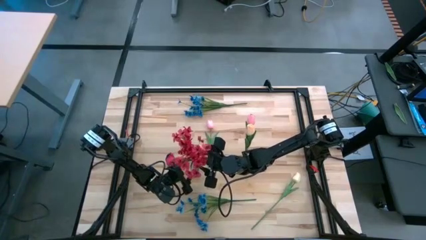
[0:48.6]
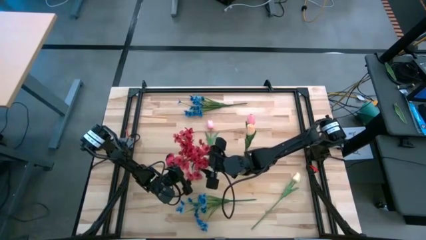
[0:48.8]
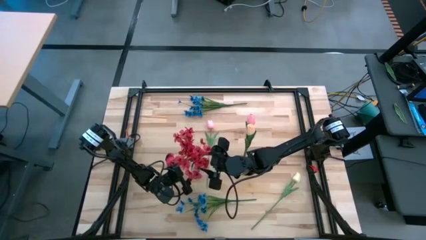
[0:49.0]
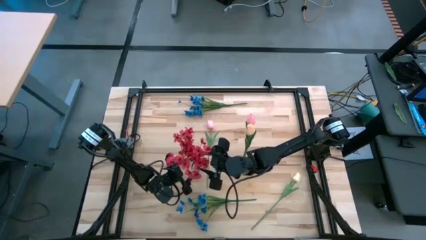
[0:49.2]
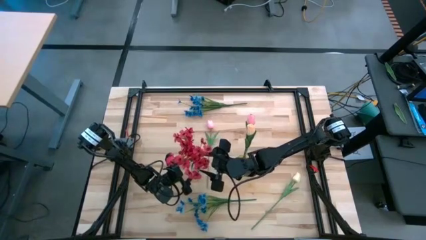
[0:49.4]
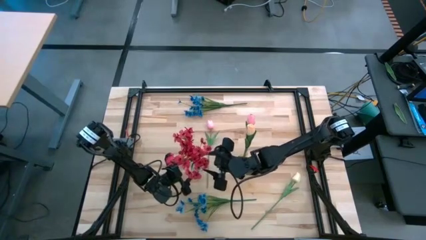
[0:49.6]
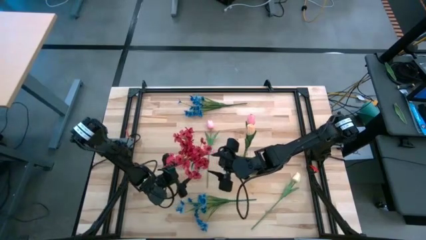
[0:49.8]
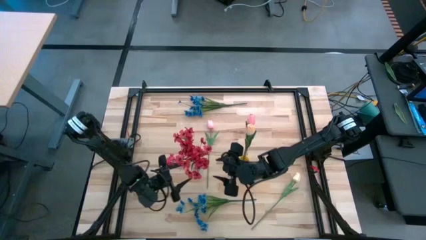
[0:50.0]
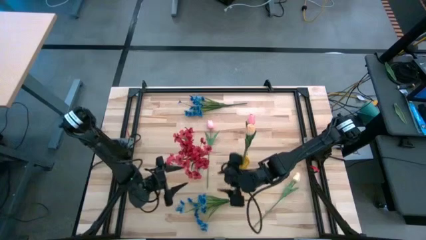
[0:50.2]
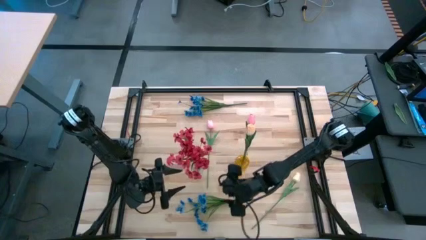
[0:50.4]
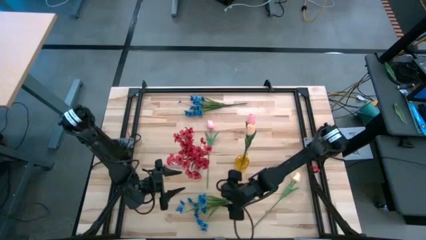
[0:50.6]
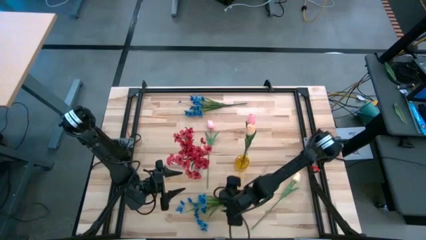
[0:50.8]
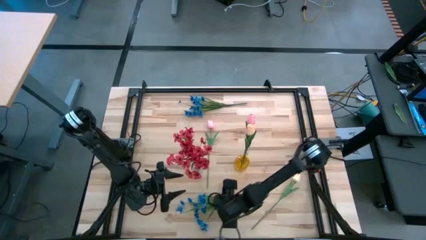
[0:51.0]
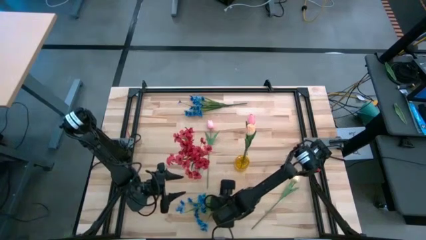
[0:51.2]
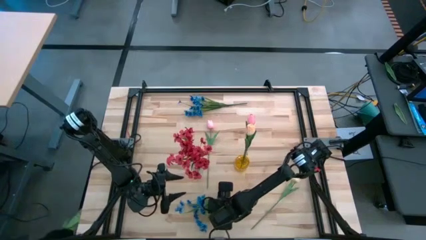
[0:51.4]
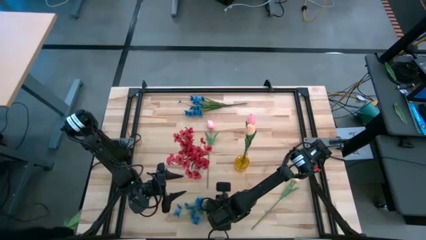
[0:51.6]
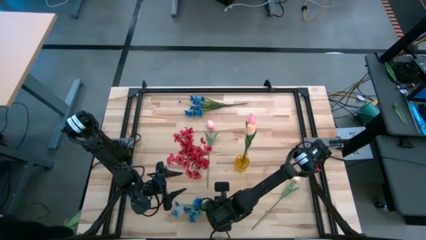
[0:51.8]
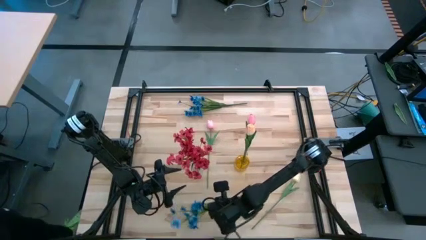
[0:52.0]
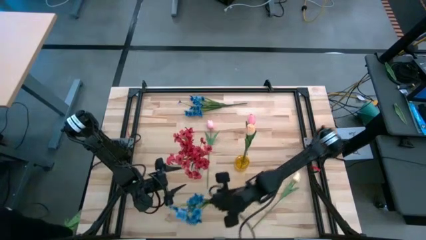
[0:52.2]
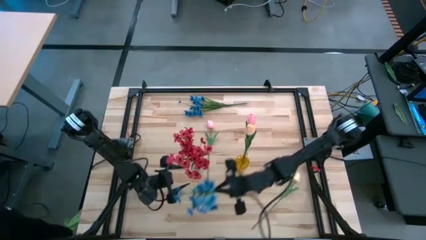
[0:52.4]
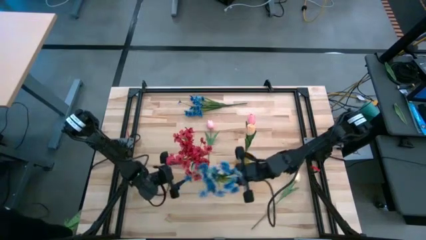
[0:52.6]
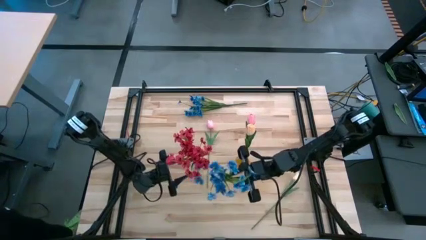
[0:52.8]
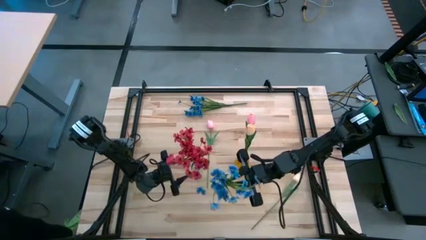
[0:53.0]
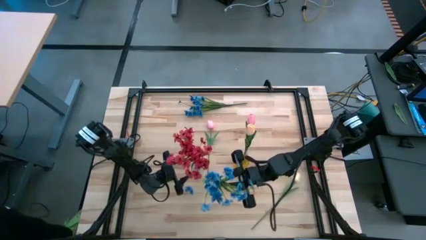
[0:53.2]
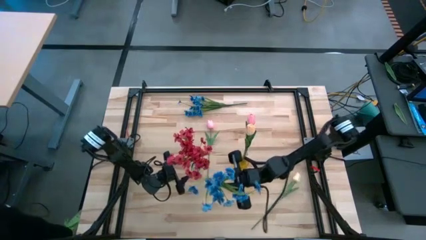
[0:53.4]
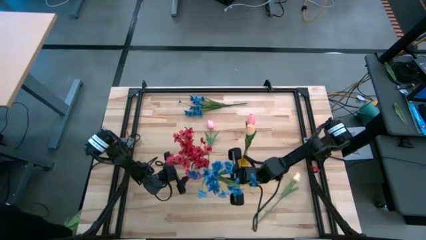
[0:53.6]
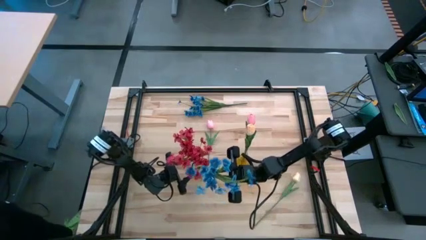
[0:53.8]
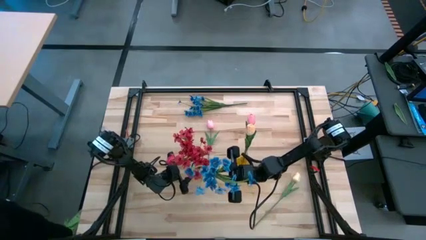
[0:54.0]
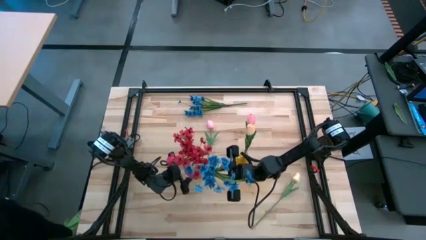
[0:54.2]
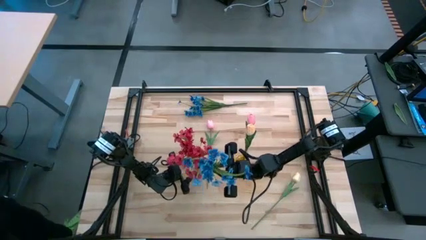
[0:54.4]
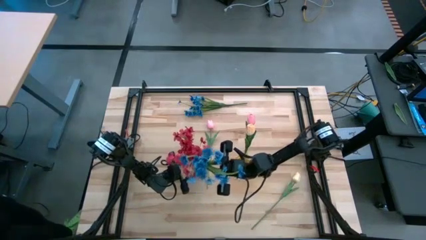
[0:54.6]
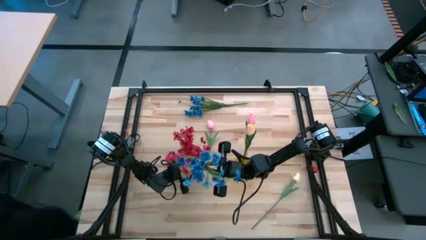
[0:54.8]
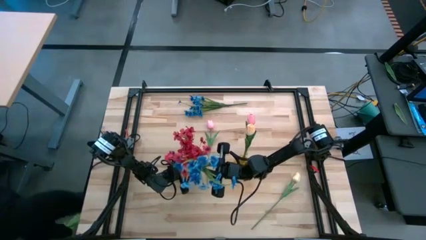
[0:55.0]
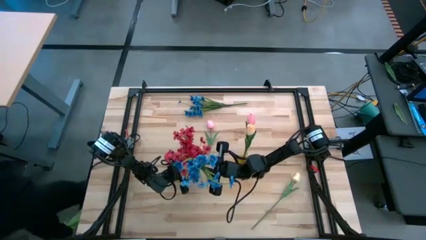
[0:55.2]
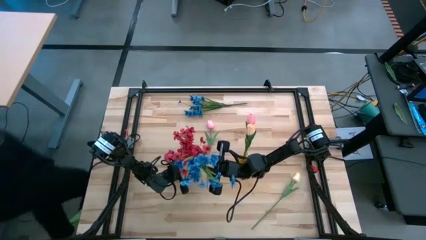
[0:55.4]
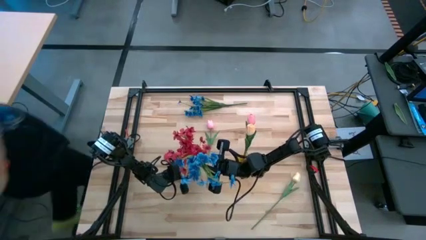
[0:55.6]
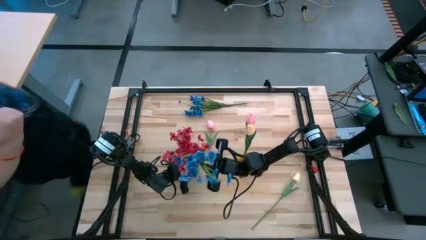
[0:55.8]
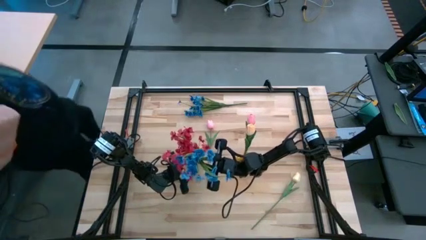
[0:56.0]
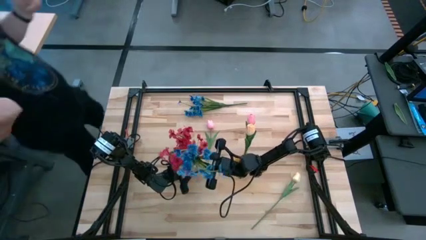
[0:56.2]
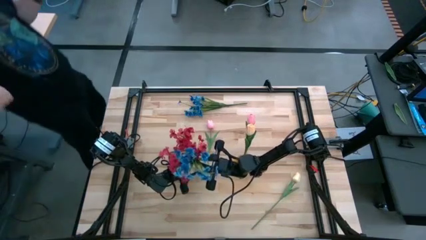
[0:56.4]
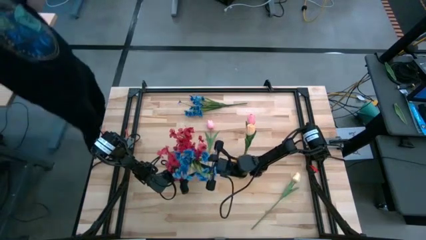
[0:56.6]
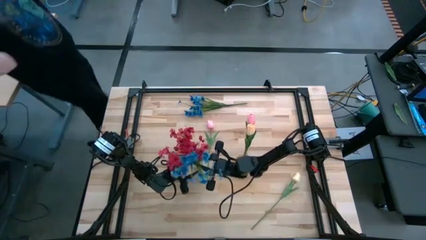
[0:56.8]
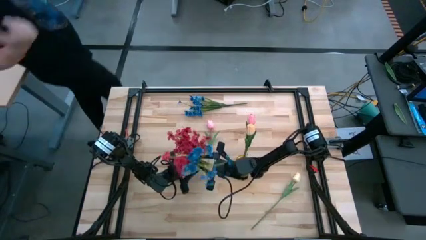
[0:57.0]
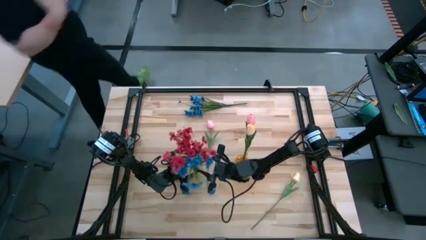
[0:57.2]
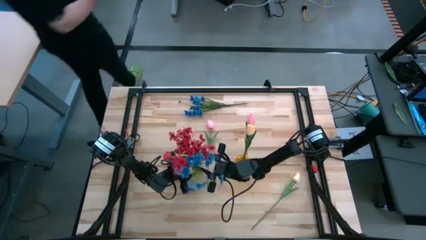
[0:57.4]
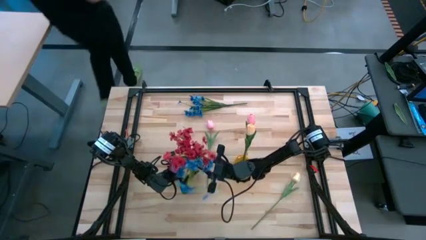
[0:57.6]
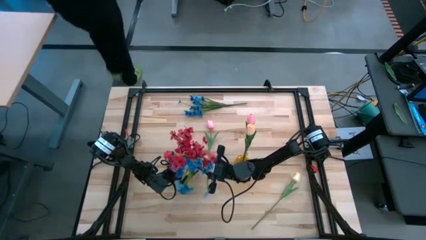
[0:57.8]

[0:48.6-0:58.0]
Task: Sort flowers into vase by color
Put the bottom blue flower into the transparent vase

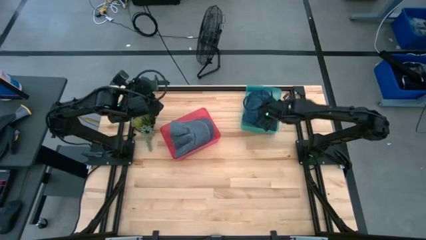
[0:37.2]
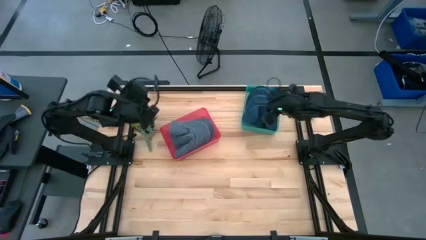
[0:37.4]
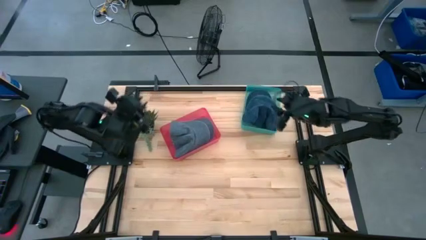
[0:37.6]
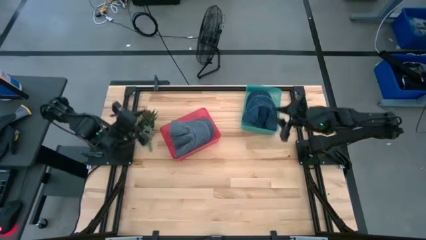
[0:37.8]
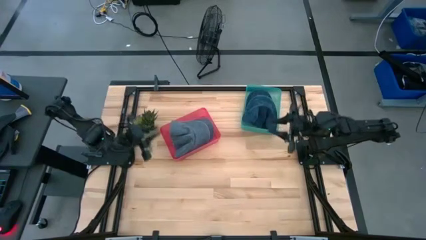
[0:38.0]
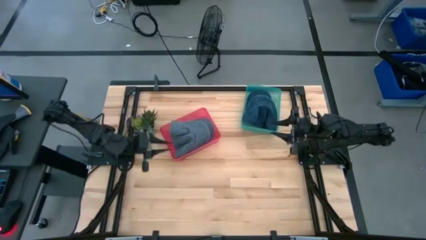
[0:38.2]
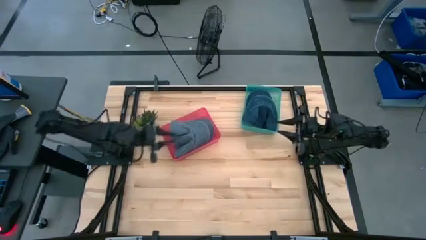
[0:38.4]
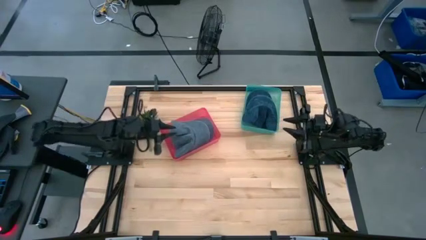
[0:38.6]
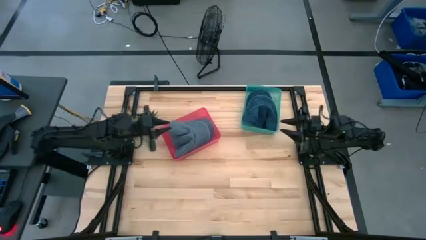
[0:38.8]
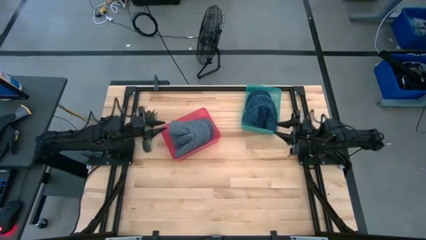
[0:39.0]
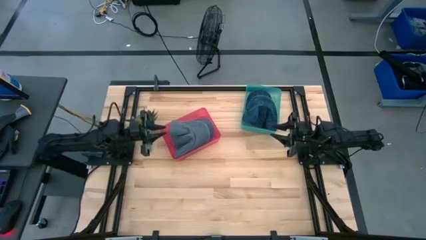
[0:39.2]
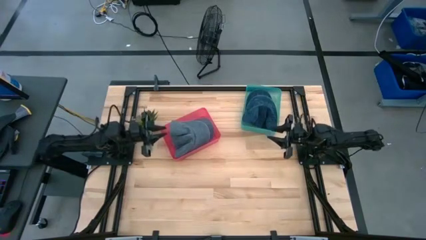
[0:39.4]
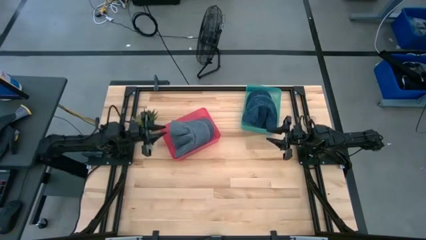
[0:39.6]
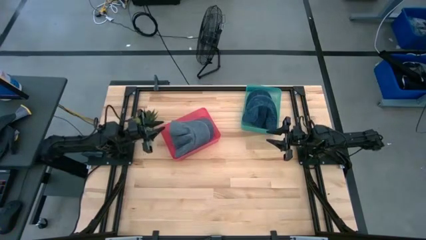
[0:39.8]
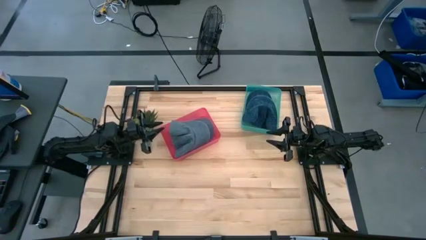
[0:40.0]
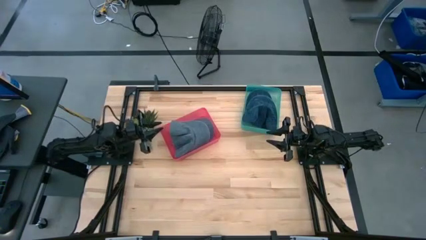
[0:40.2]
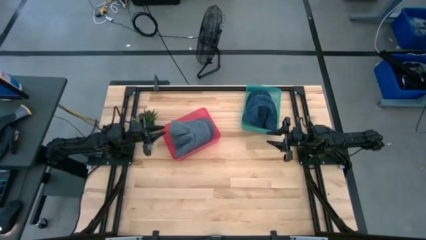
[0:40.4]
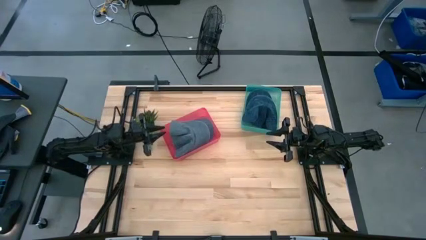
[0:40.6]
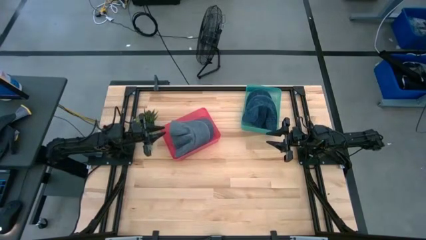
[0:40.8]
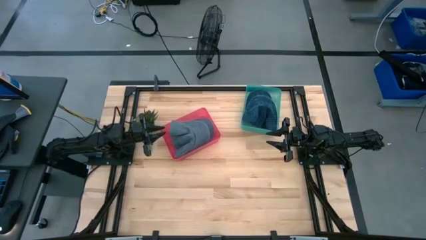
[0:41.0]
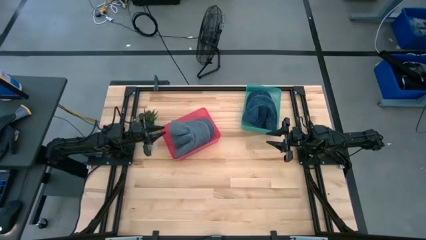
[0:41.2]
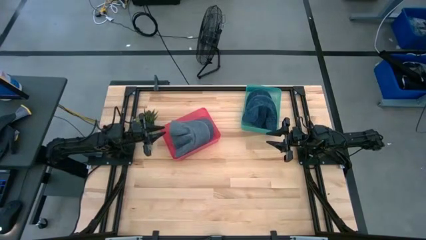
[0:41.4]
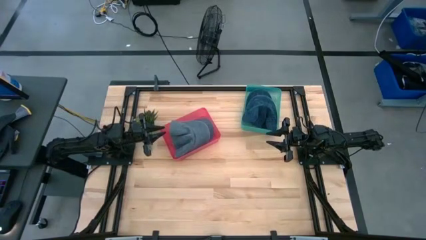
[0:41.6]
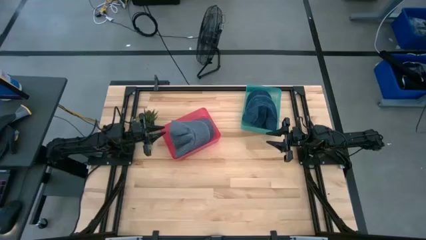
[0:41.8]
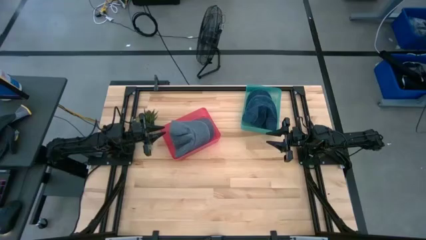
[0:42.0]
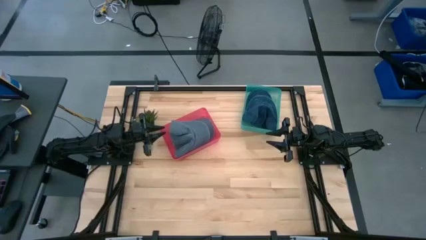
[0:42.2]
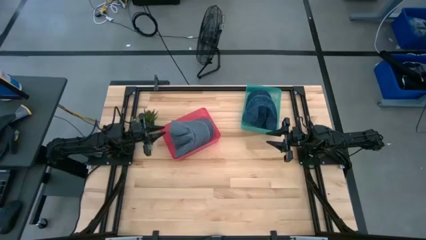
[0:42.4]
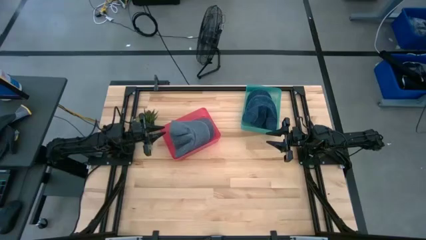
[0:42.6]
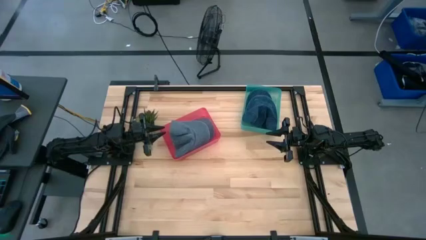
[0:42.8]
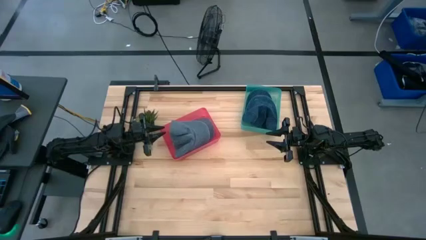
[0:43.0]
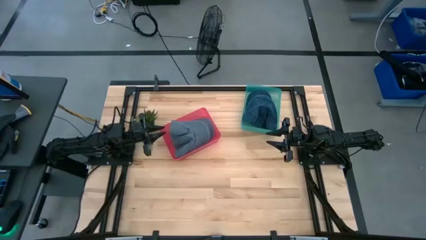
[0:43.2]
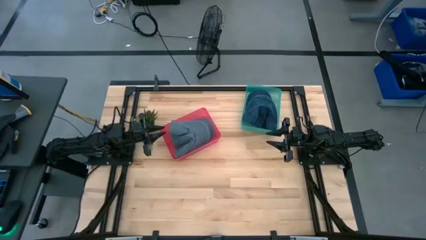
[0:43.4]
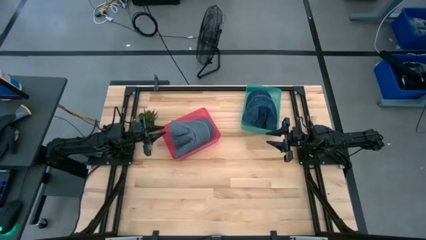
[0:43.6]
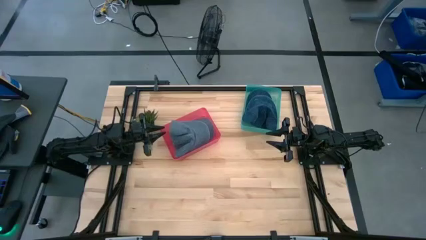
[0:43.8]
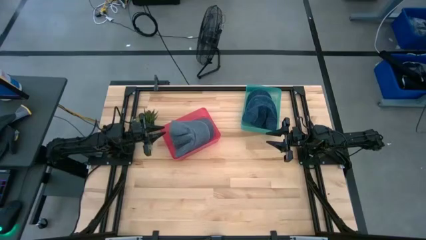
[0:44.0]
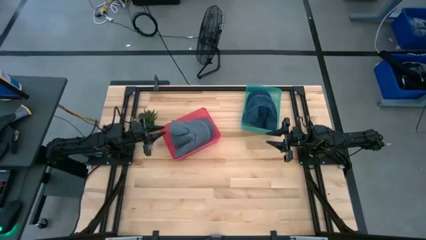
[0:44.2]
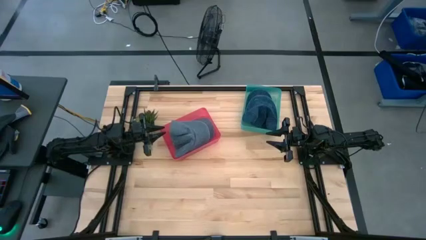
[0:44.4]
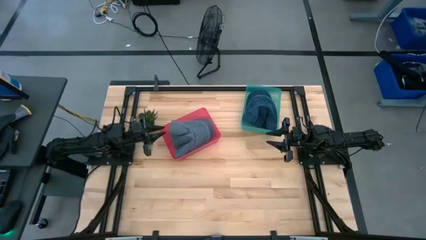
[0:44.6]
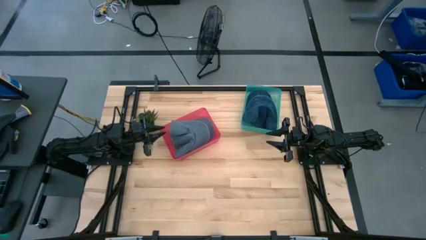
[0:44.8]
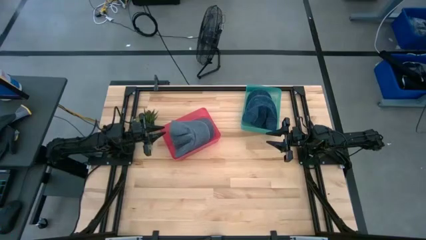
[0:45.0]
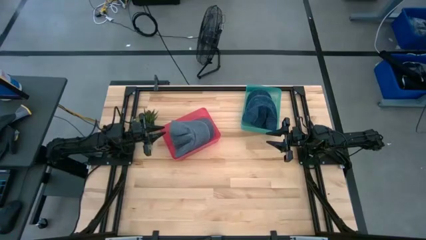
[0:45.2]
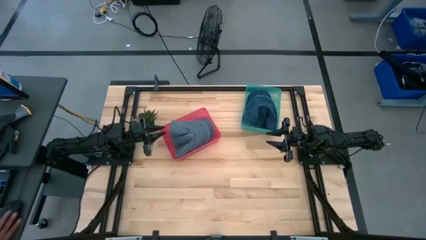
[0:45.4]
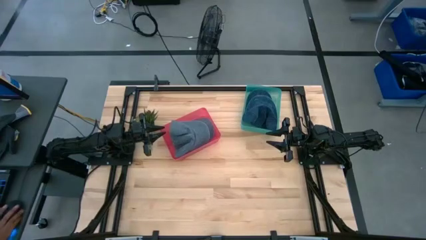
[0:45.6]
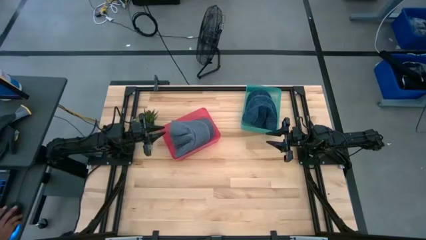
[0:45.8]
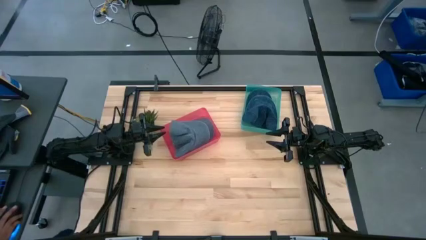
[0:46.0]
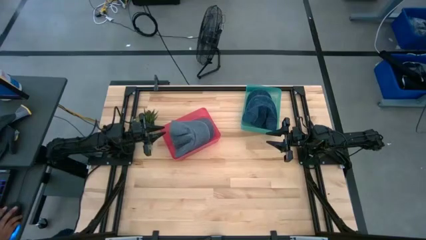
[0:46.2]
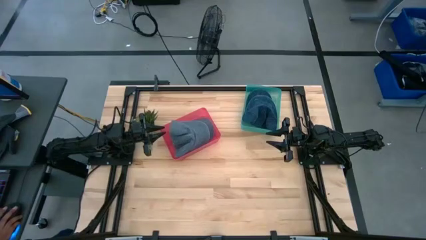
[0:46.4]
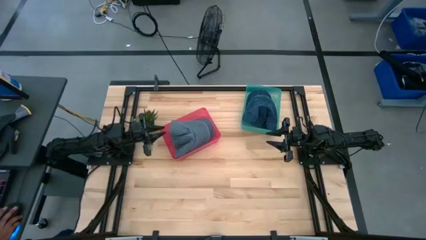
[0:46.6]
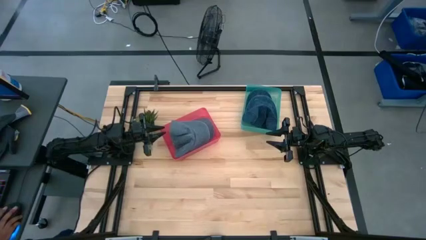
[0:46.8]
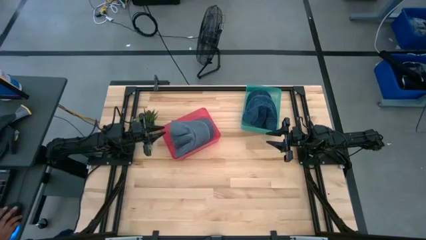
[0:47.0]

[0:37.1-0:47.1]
Task: Pick & Place hat
Return to Home Position
